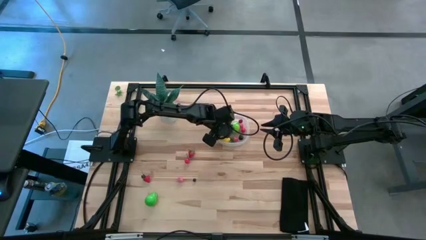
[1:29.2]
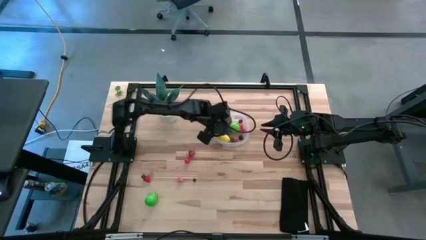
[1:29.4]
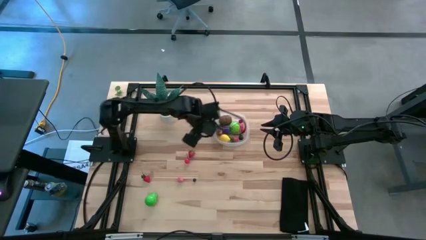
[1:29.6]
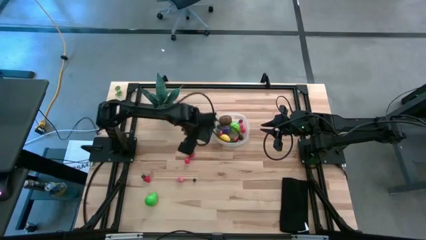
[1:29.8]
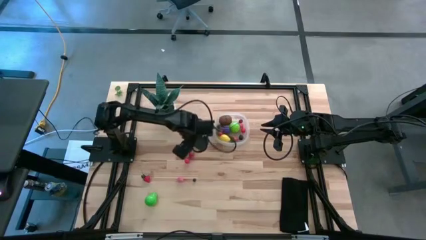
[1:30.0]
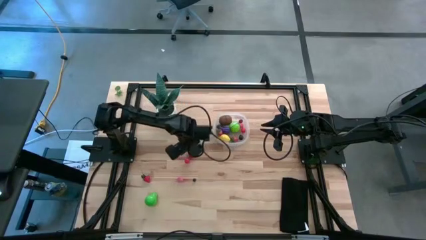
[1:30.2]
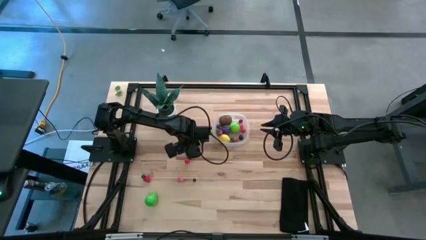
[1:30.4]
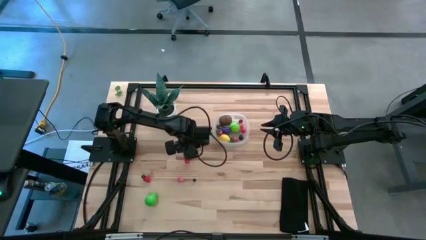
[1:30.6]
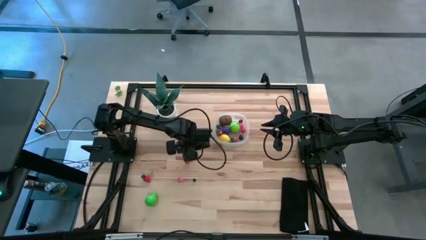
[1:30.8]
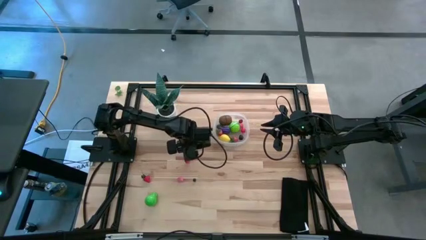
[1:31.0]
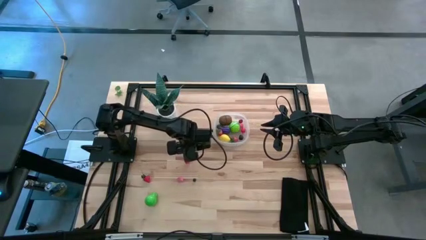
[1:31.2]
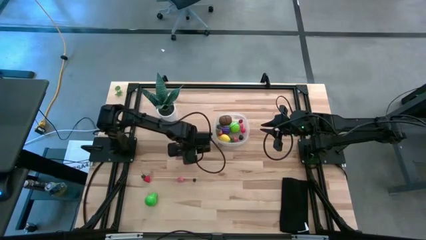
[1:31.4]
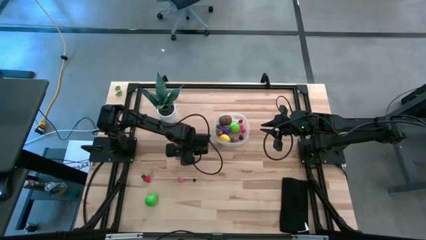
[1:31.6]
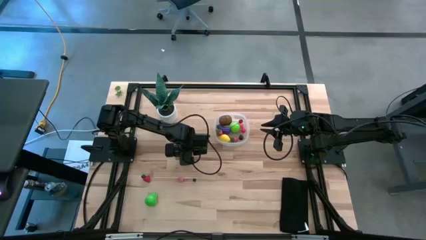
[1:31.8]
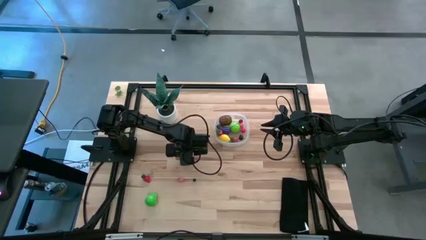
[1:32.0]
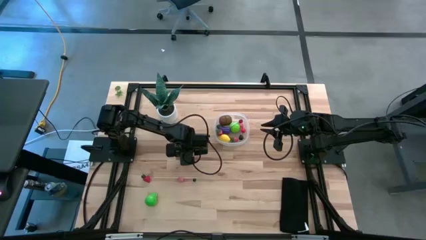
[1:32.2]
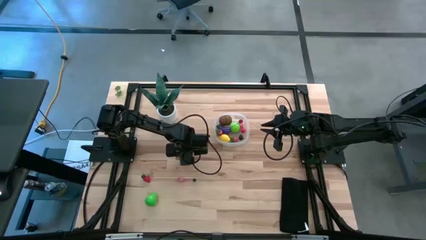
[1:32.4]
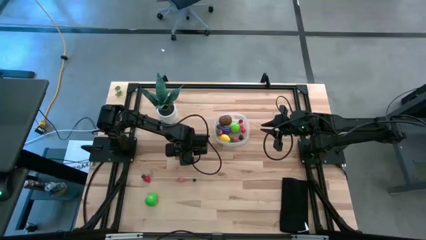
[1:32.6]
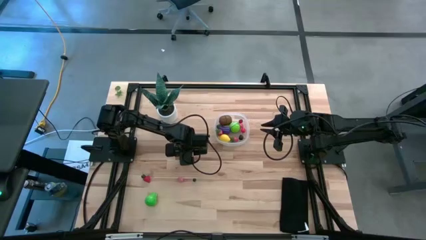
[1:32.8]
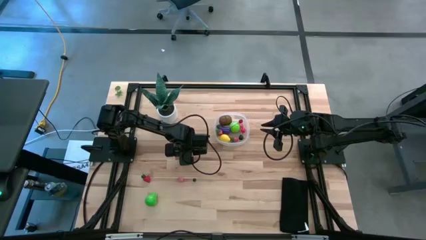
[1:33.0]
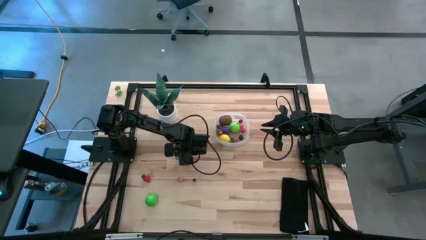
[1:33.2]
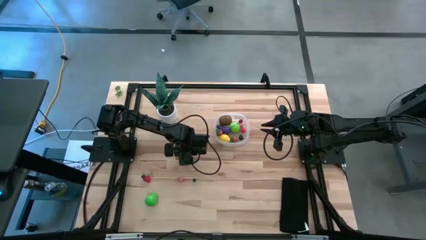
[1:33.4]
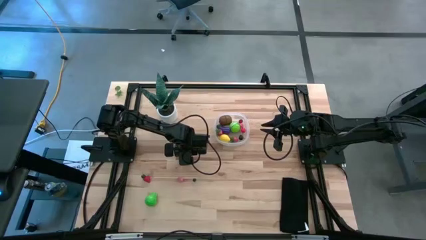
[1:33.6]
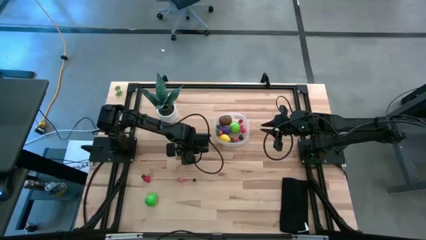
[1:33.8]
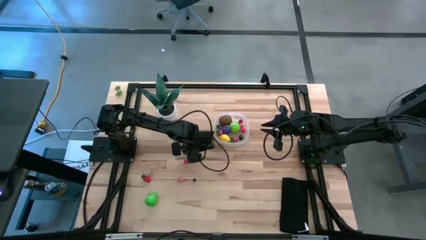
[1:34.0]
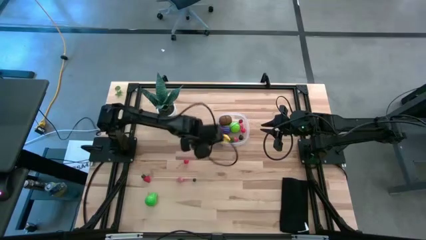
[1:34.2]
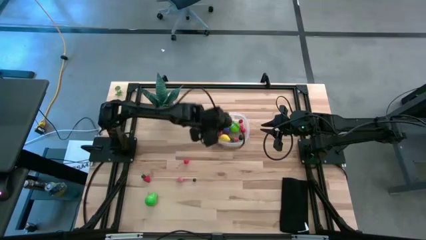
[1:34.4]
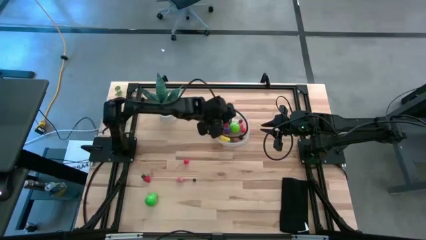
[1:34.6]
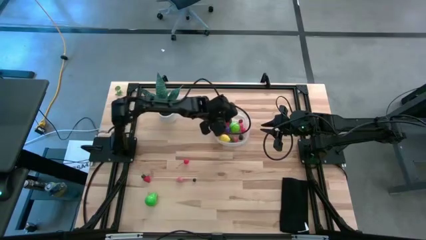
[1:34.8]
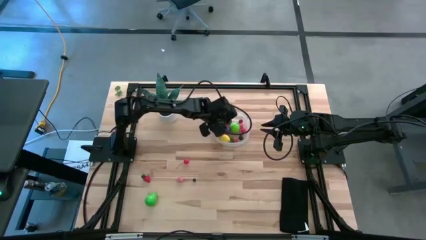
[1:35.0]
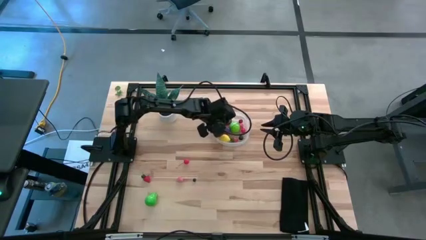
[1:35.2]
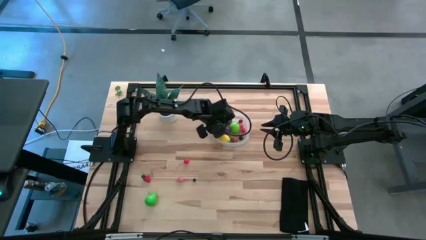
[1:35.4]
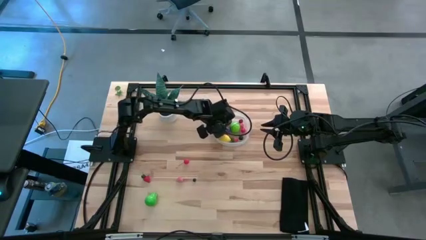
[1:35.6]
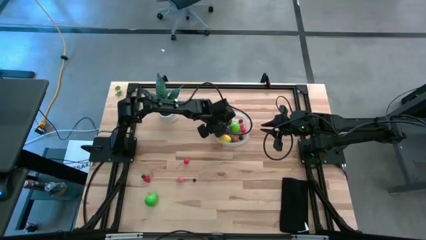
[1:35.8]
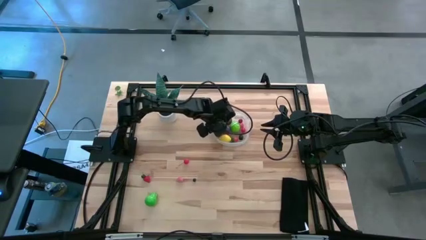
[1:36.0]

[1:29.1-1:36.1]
Task: Pick and placing Produce into tupperware
Put the right strawberry into the transparent bin

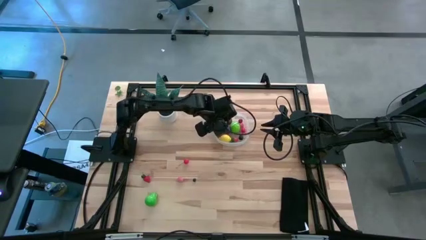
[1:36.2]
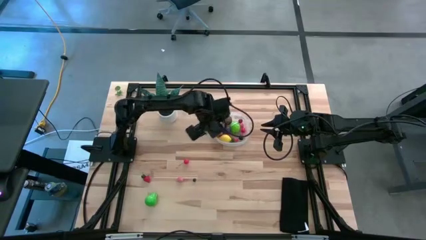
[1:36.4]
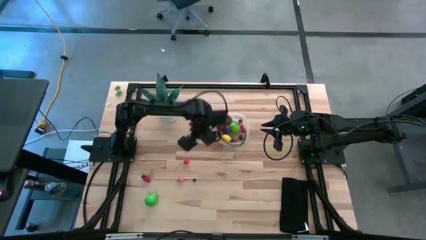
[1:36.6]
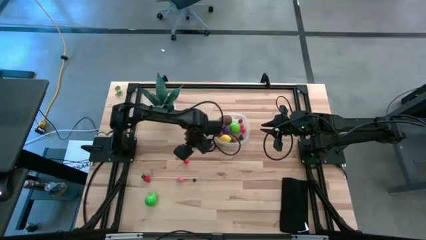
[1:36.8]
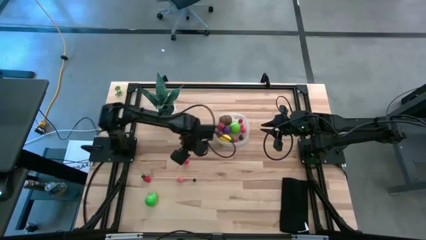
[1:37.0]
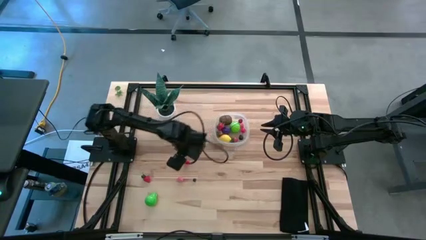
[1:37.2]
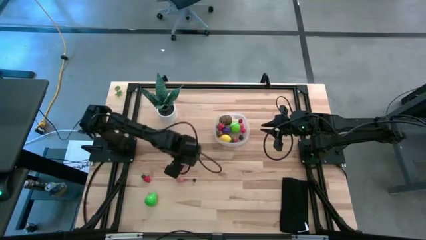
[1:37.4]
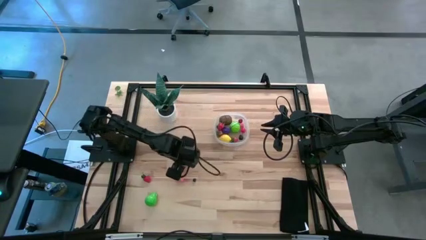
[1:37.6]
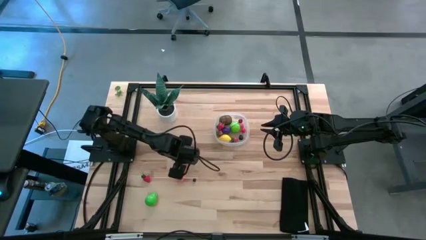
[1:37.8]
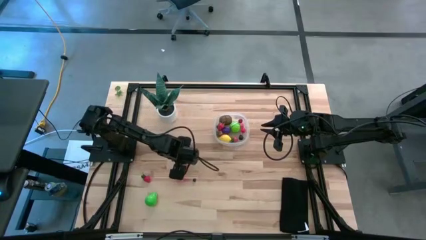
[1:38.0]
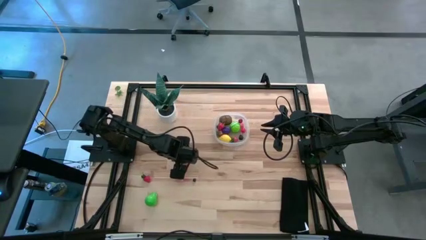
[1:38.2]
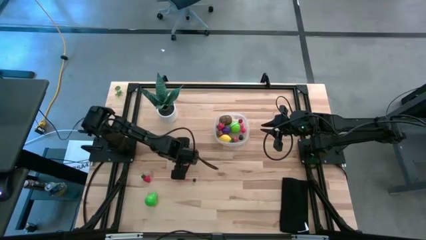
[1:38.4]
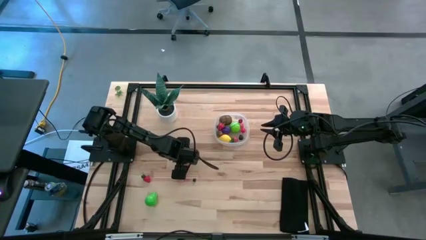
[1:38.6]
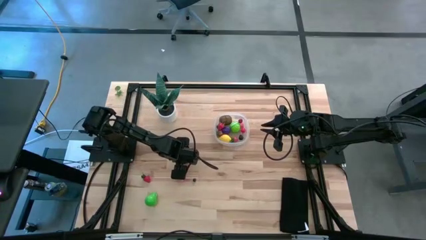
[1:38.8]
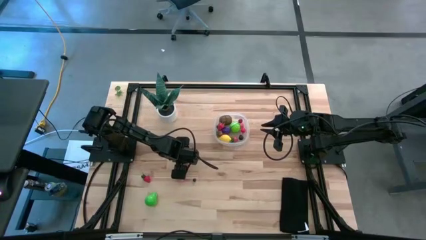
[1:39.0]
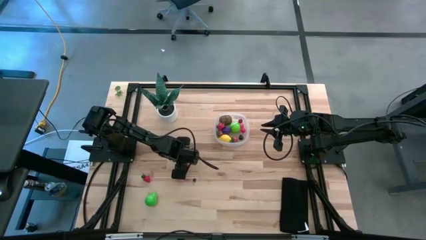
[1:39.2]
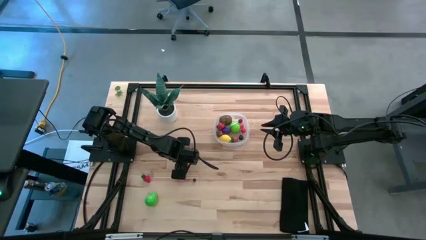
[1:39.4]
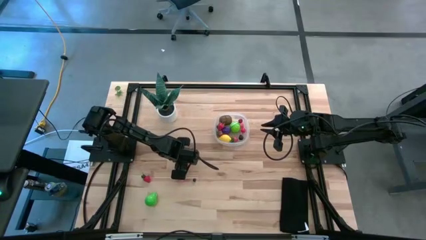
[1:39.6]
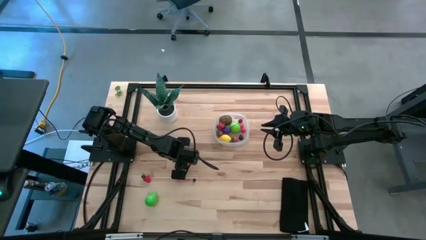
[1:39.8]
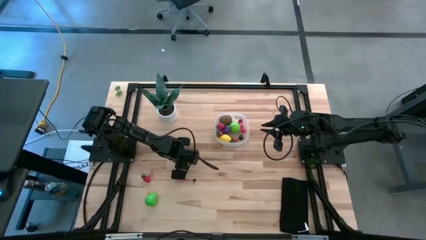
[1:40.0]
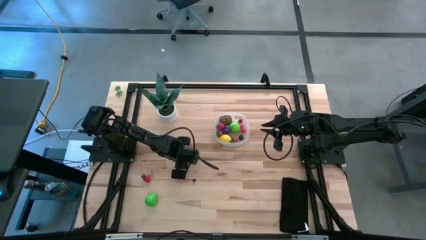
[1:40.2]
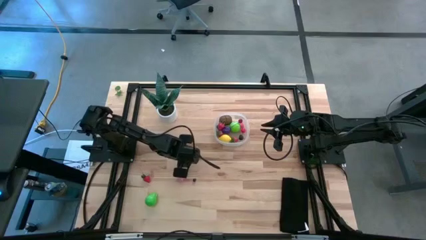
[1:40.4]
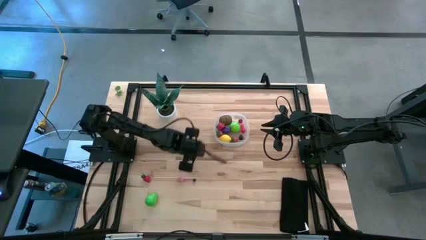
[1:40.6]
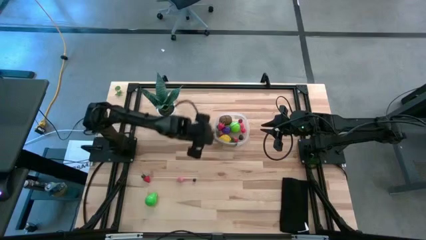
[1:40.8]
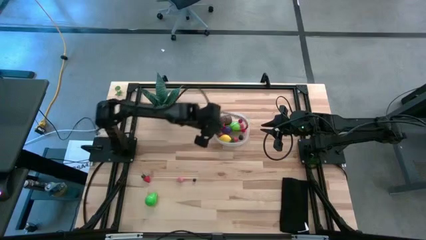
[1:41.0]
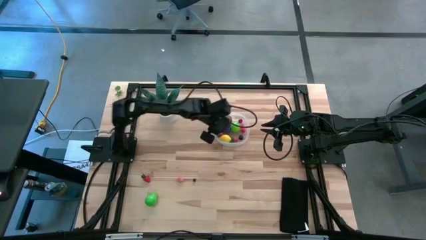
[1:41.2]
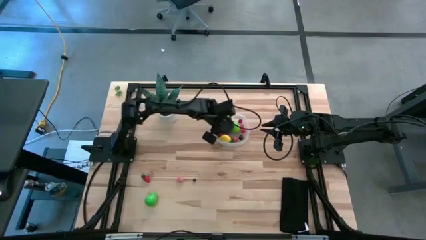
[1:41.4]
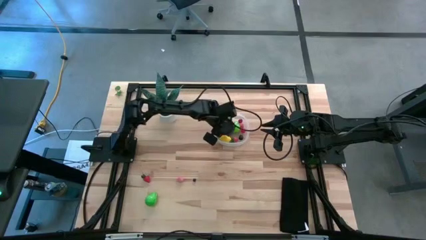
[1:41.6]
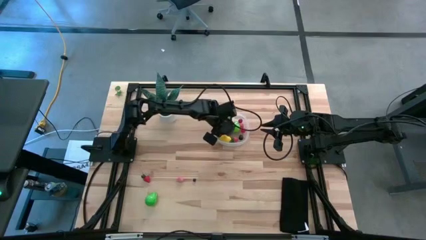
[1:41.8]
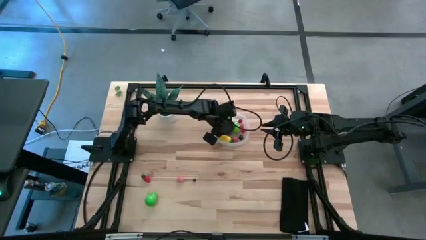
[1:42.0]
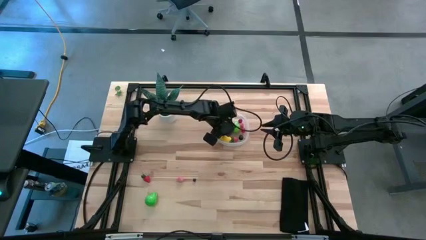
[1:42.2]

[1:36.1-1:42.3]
Put the cherry into the transparent bin

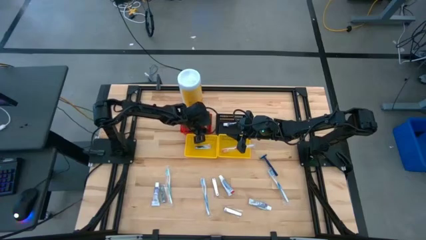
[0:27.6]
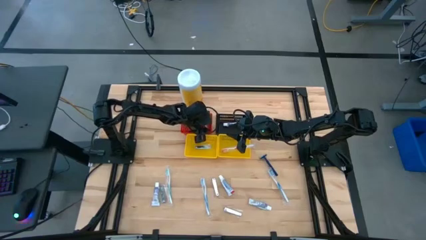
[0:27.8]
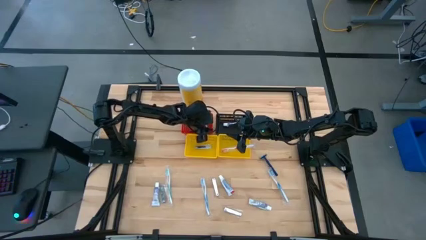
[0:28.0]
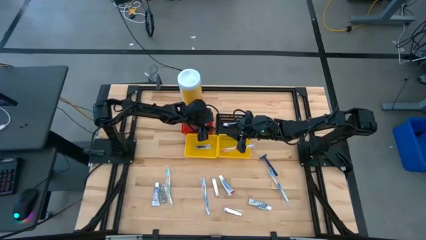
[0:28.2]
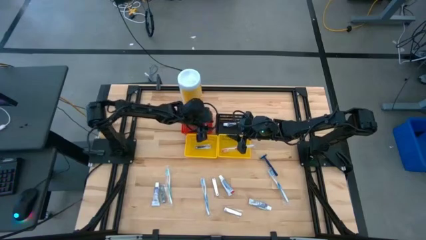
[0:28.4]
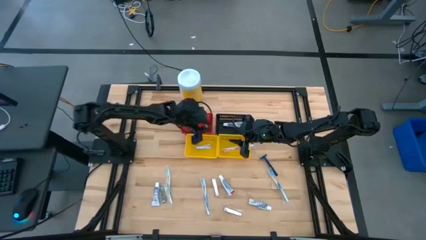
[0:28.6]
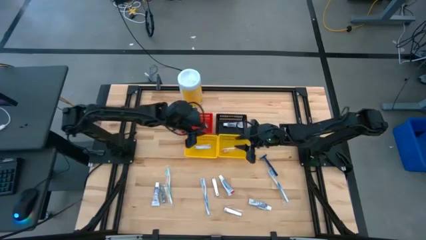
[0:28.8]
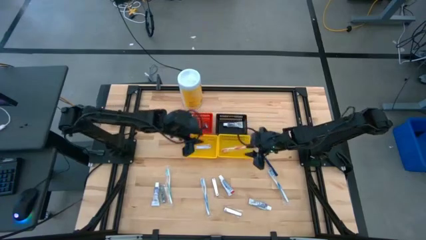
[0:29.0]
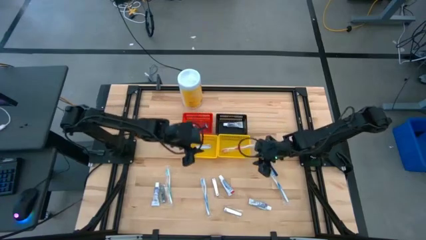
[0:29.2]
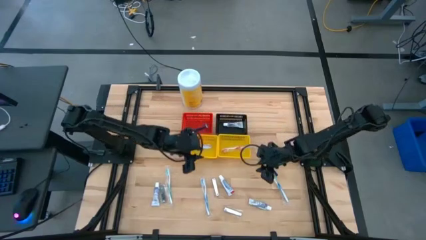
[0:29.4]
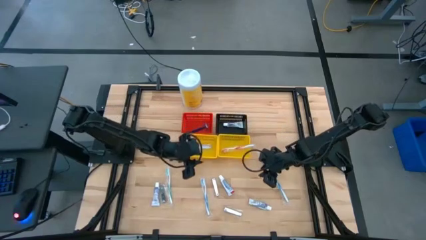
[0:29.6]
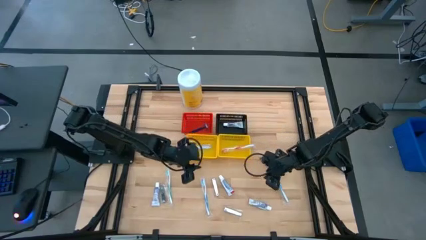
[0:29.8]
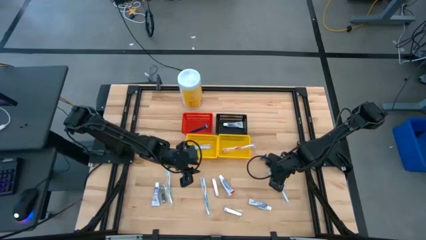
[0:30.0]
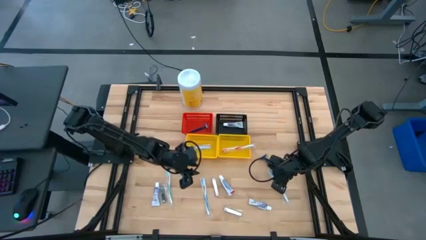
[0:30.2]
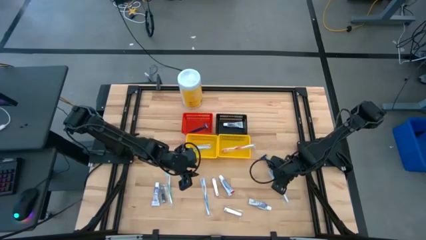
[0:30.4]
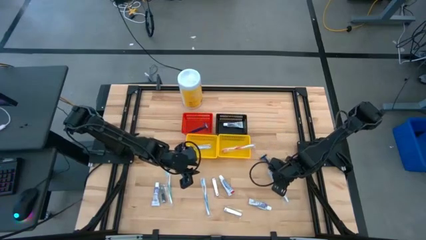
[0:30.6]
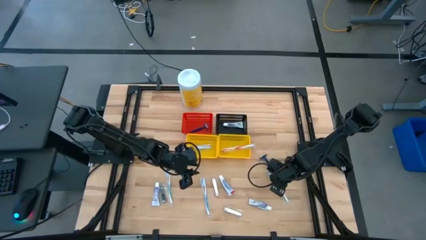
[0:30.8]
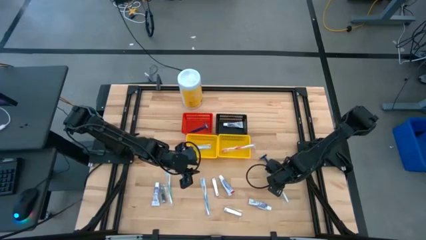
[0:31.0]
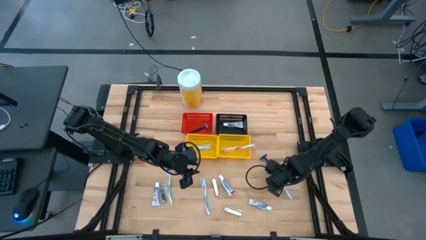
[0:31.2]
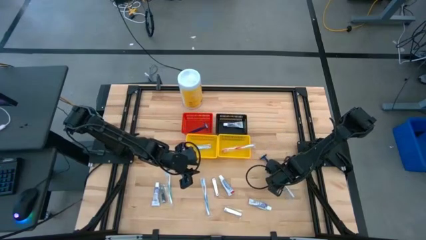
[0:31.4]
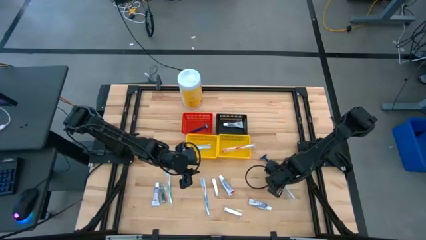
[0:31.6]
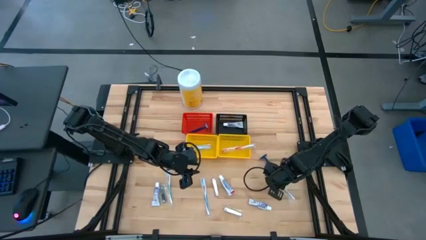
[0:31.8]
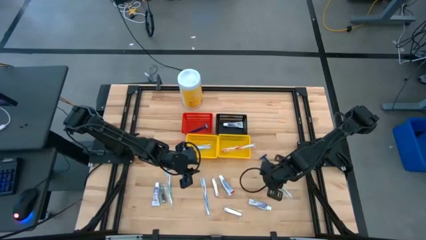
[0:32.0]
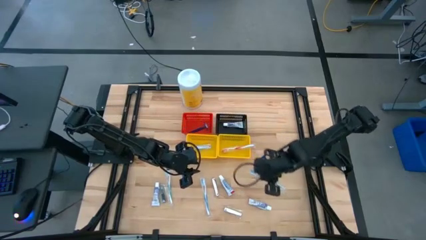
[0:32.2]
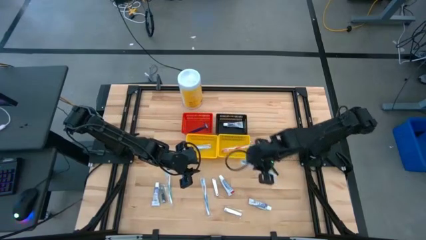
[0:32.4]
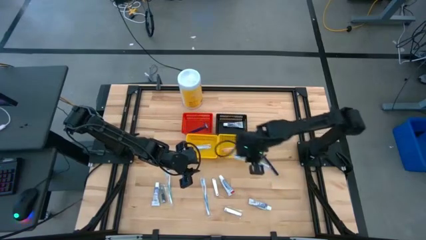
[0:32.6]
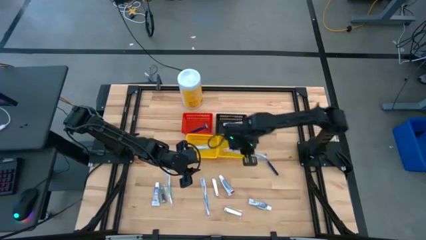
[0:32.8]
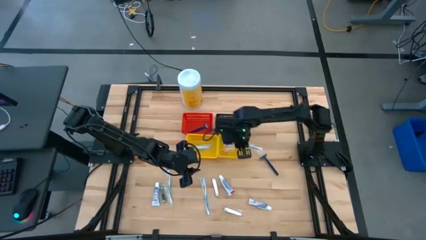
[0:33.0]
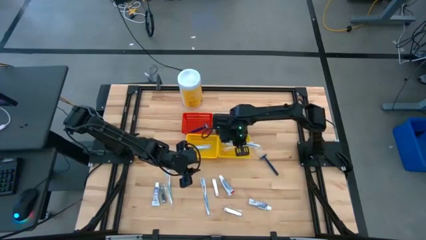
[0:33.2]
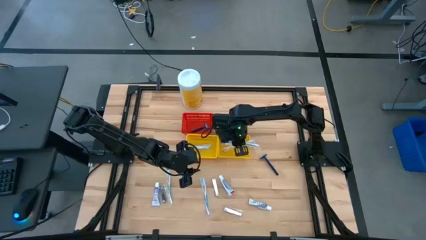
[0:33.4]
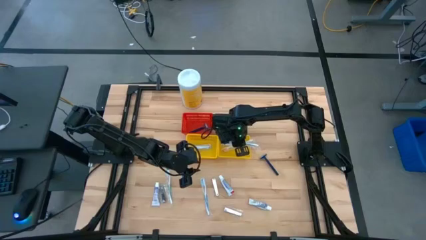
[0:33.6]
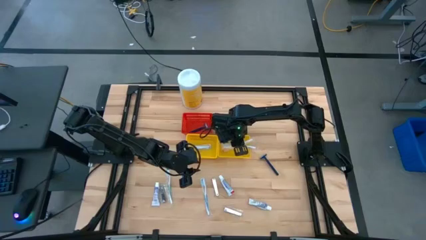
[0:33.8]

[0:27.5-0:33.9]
Task: Pick & Place Travel size toiletries
Put the blue toothbrush into the right yellow bin
